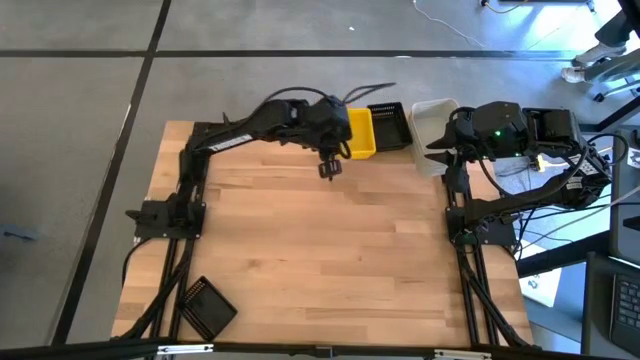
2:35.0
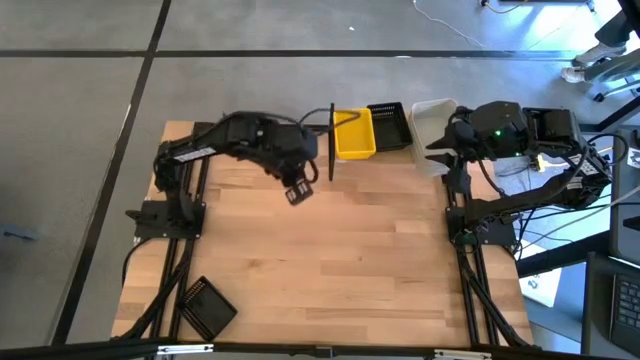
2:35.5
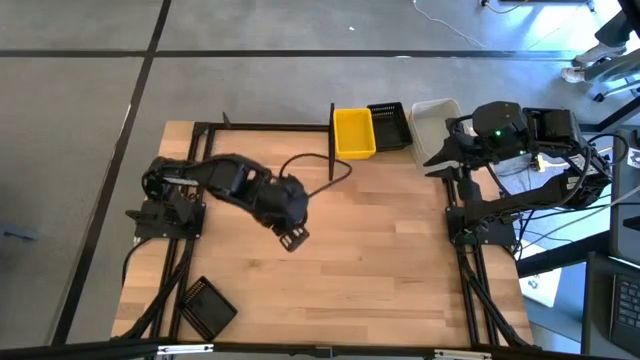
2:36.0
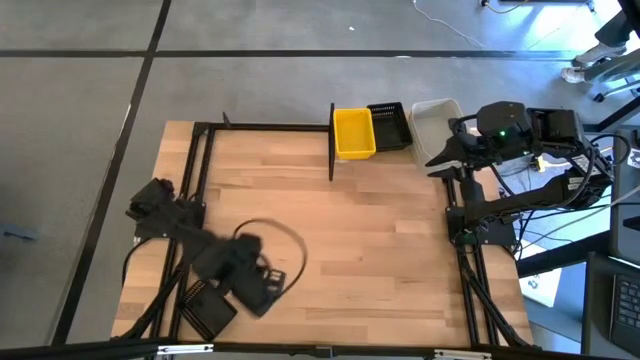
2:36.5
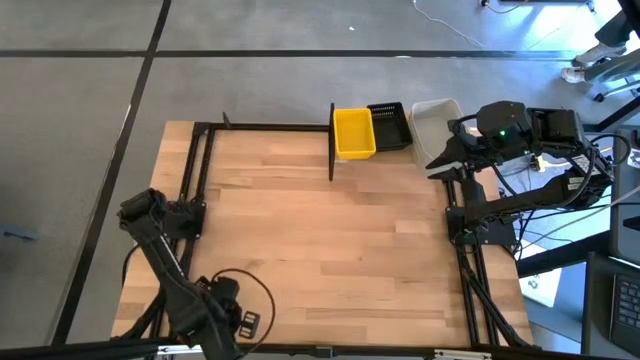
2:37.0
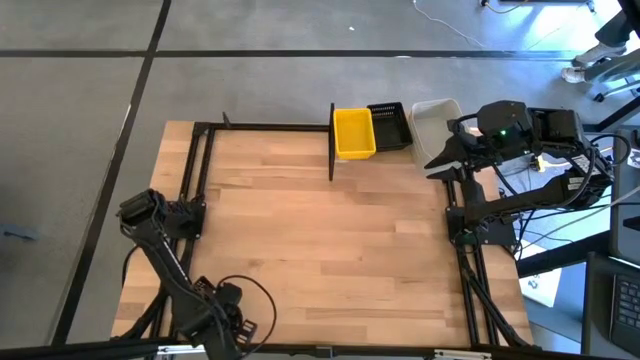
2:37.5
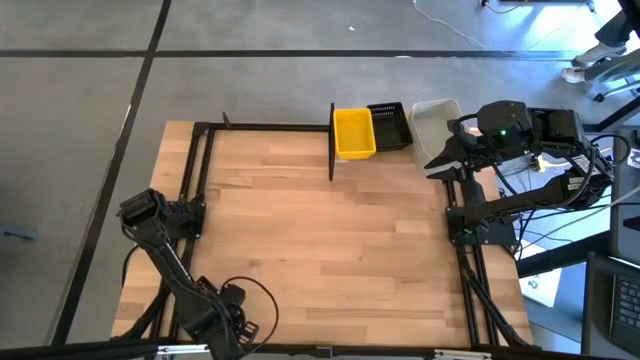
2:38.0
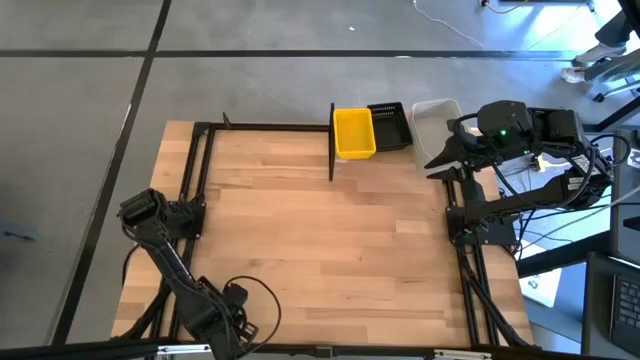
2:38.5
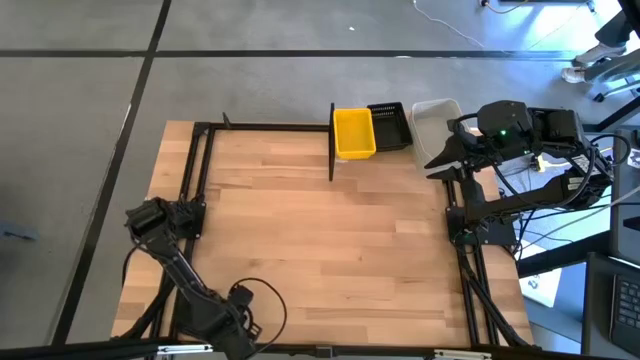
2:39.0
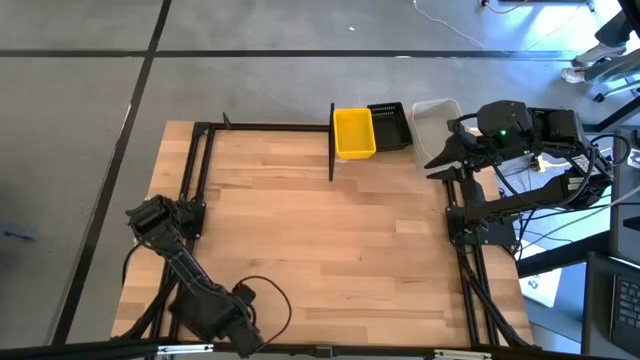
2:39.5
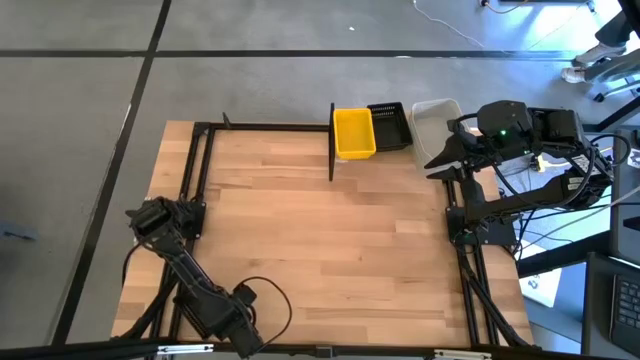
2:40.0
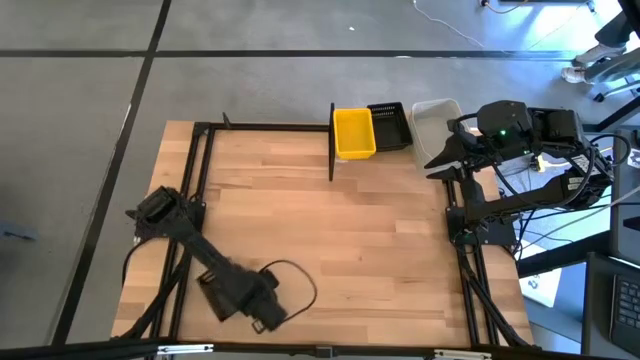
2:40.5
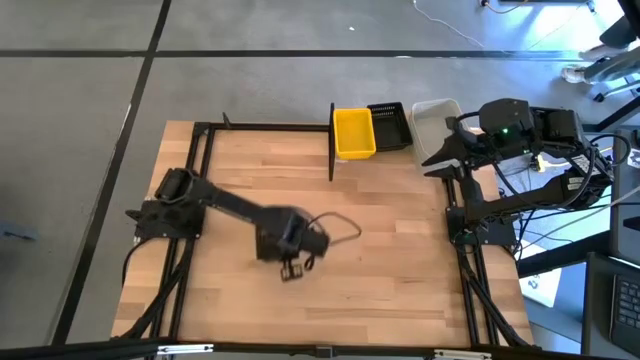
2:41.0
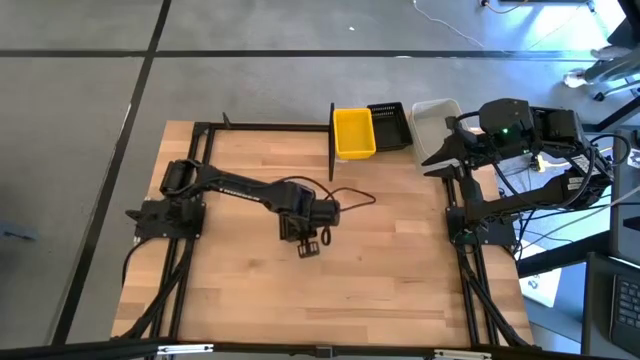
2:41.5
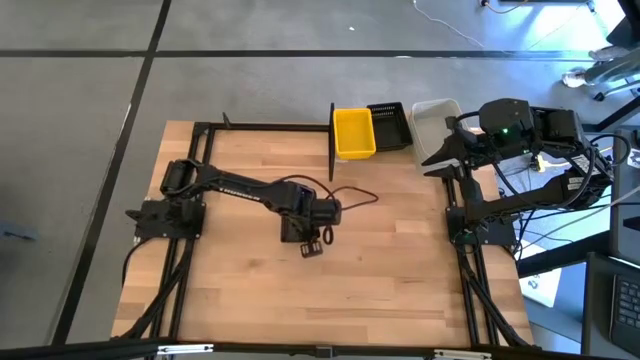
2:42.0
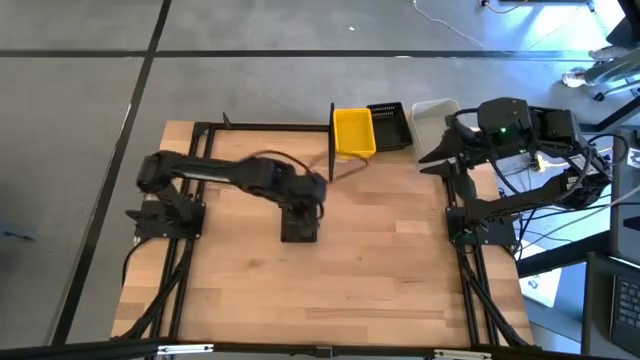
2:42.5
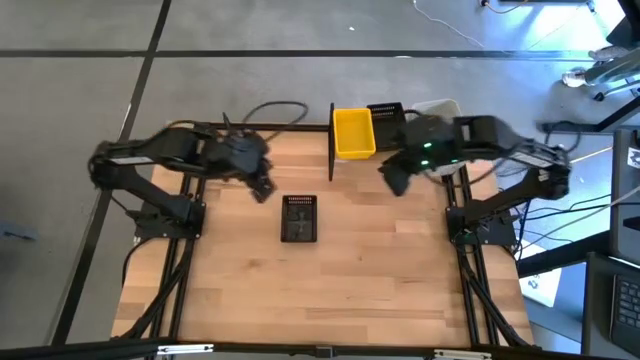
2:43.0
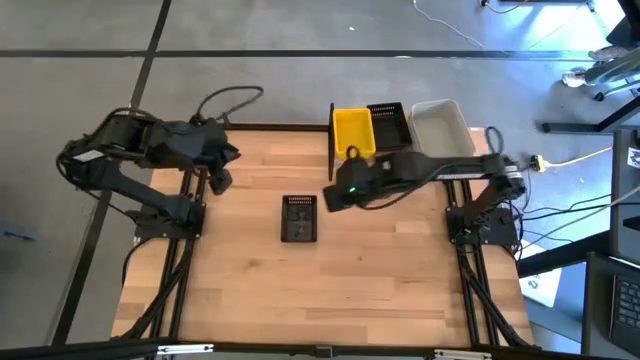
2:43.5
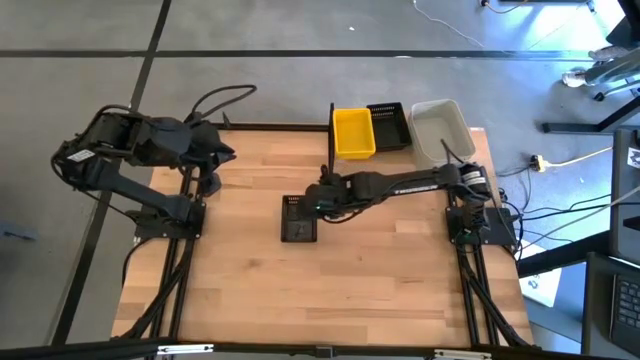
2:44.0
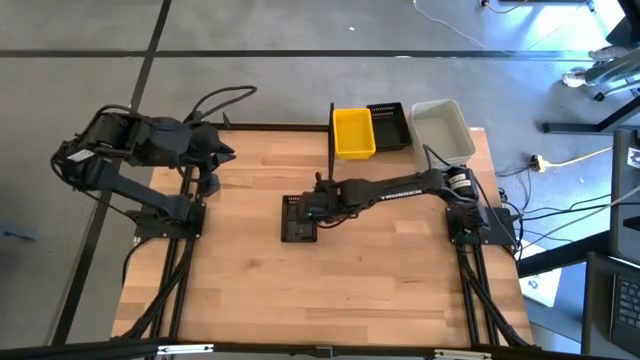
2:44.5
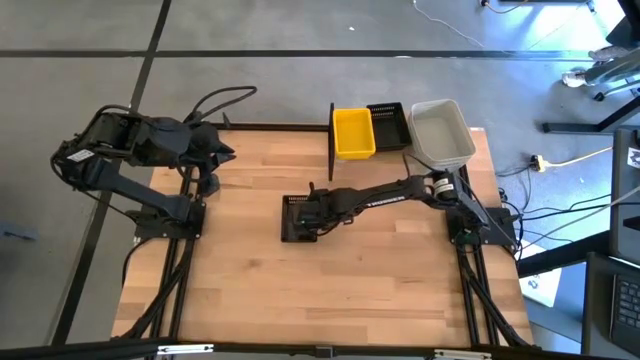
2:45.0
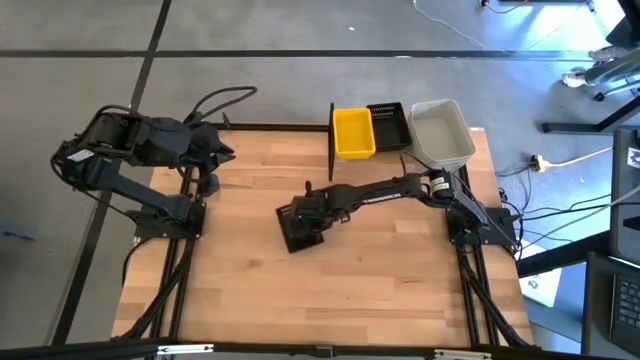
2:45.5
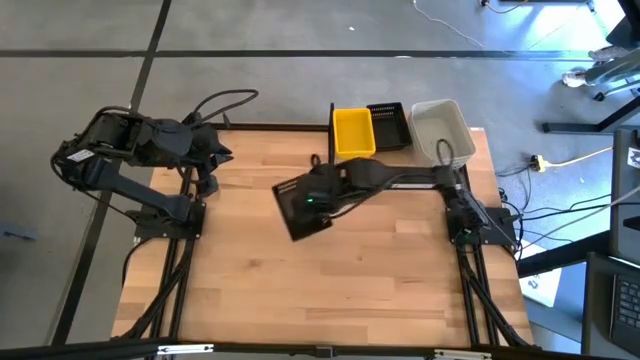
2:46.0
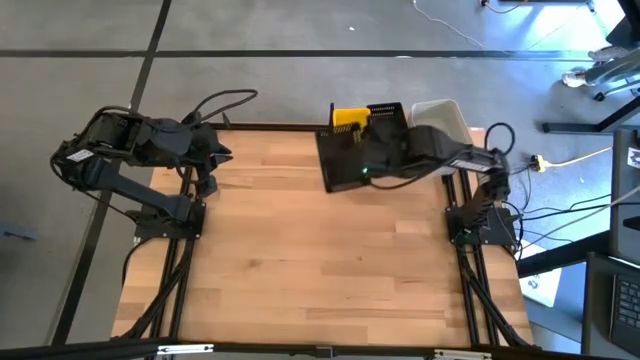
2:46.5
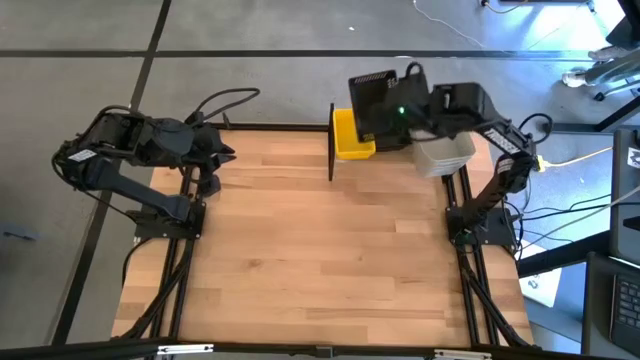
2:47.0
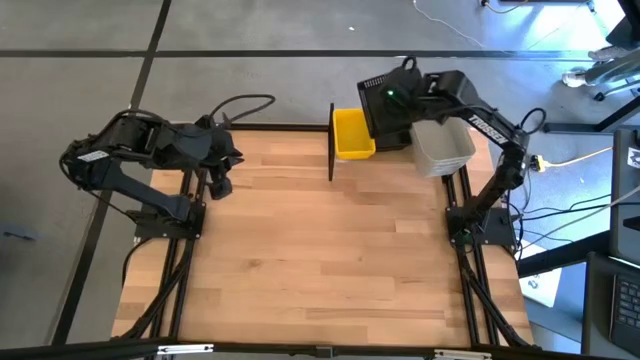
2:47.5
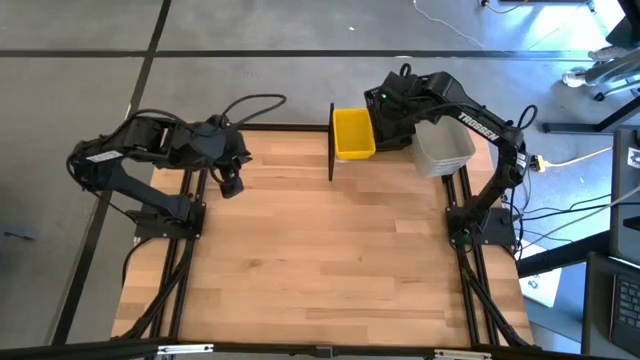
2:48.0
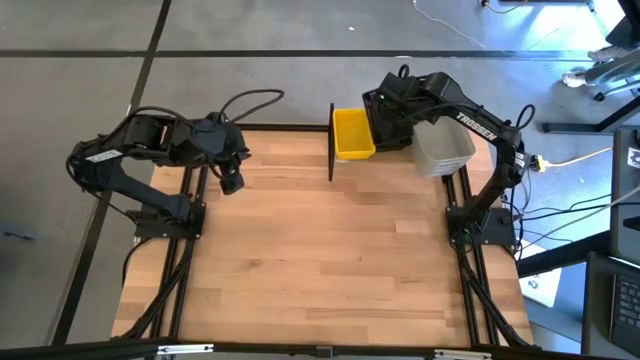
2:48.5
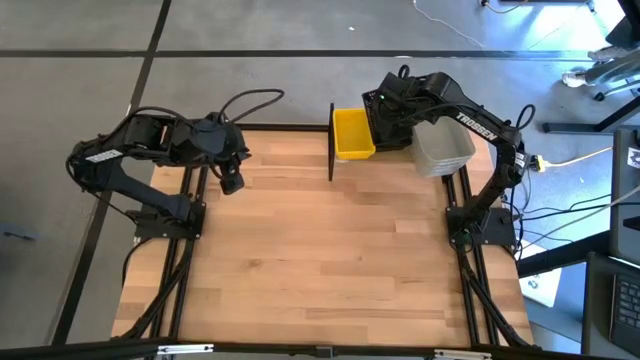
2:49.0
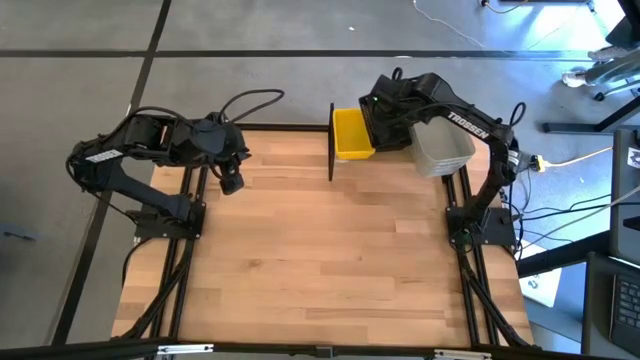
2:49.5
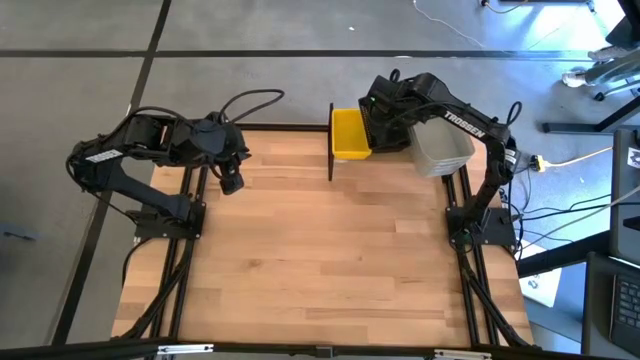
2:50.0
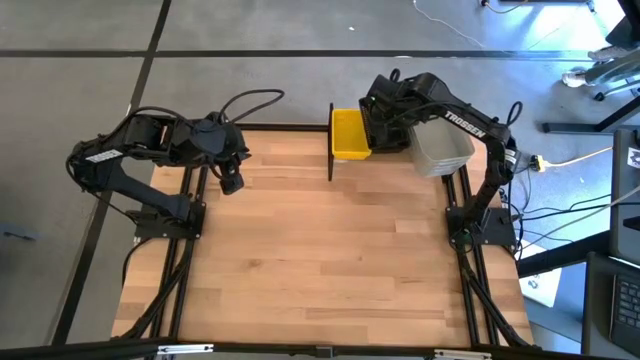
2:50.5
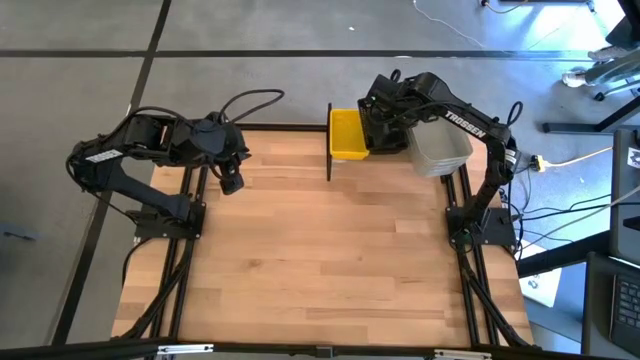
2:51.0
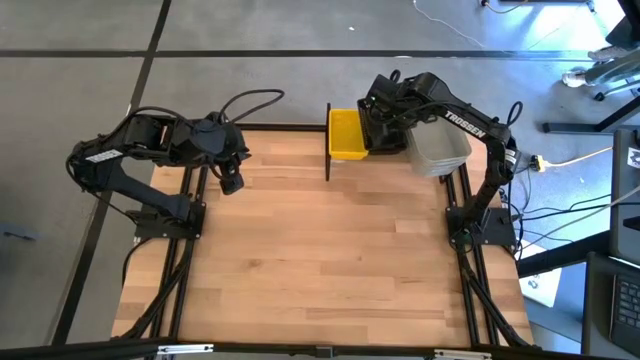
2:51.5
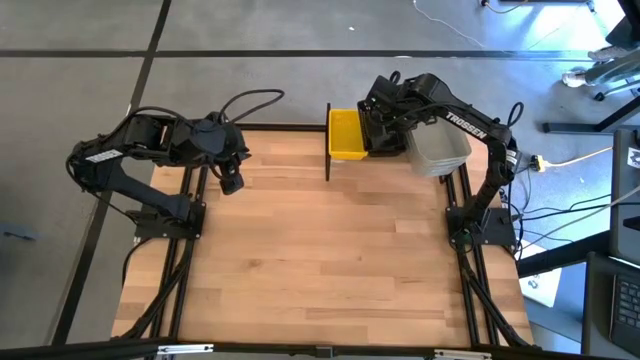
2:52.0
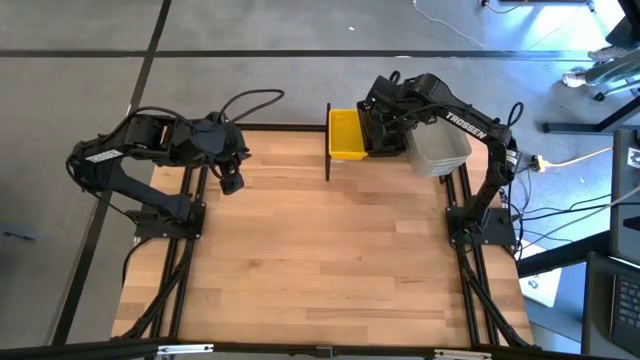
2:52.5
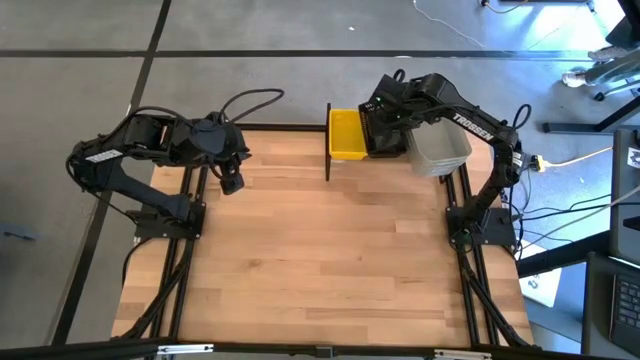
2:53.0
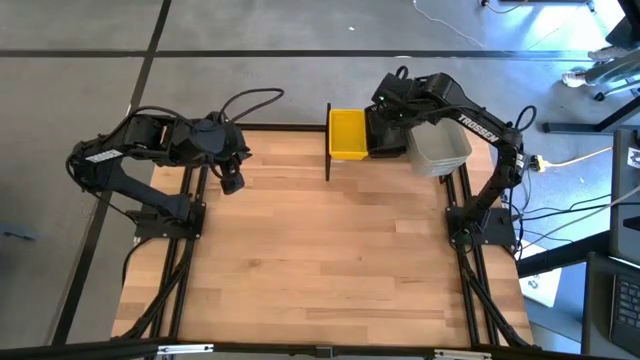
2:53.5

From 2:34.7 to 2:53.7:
Task: Stack baskets on shelf by color
Stack the black bin on top of the black bin on the shelf
